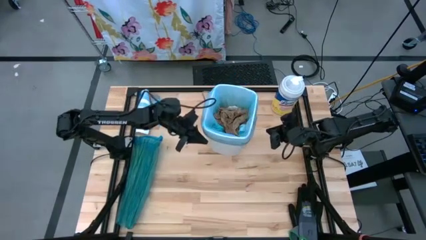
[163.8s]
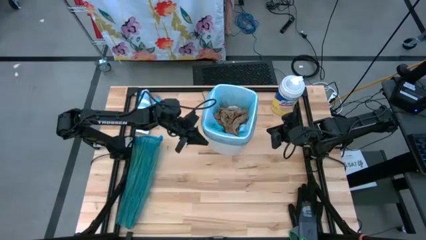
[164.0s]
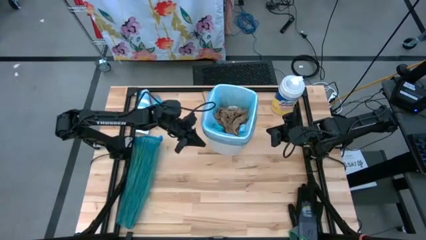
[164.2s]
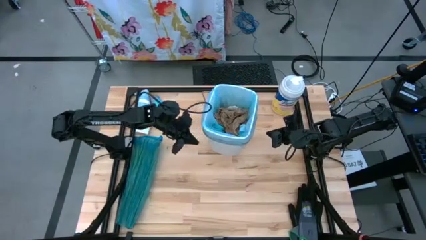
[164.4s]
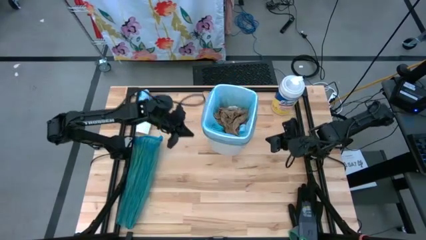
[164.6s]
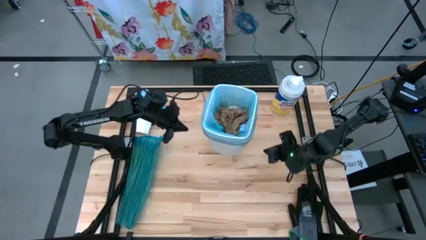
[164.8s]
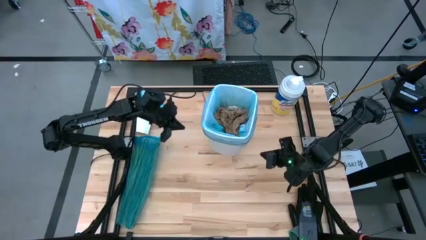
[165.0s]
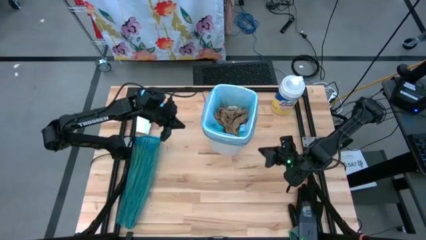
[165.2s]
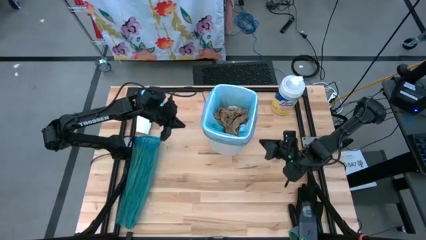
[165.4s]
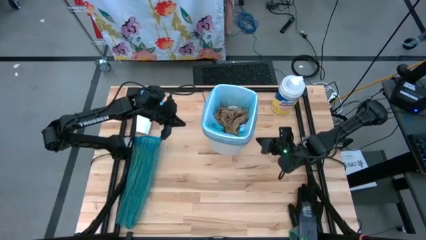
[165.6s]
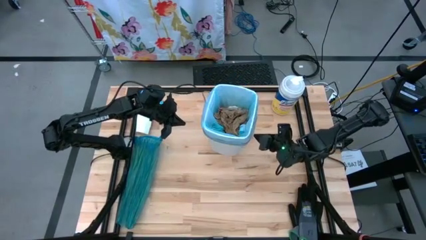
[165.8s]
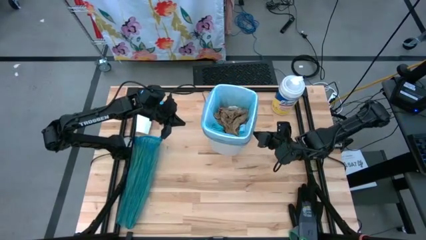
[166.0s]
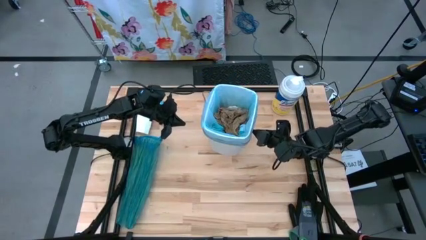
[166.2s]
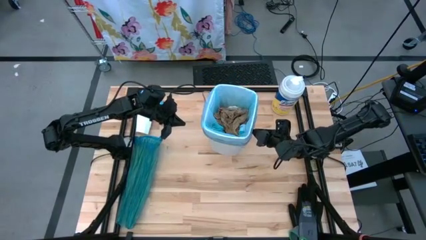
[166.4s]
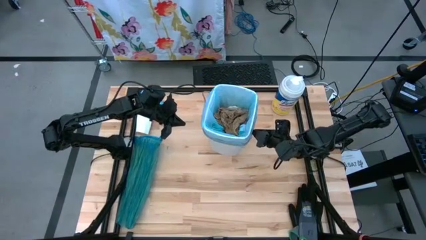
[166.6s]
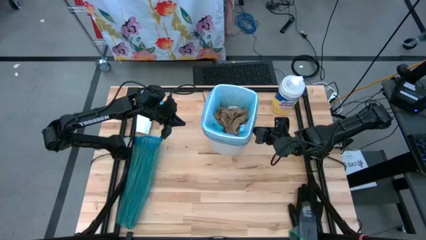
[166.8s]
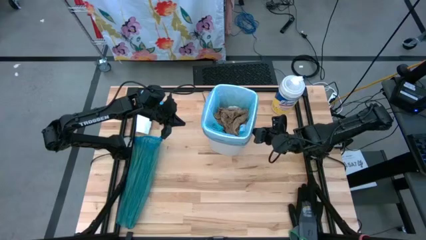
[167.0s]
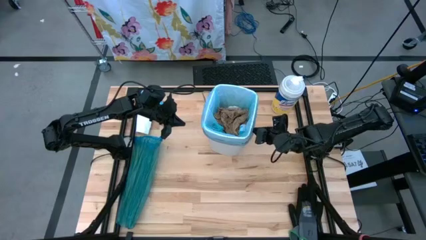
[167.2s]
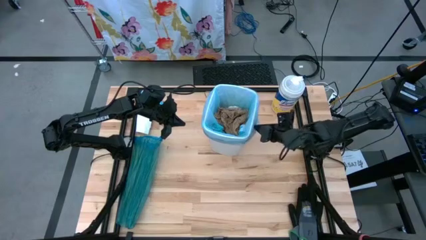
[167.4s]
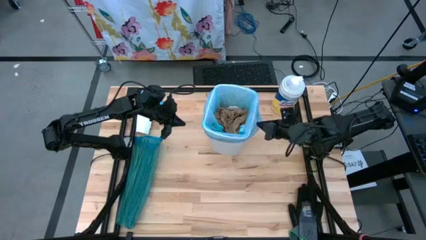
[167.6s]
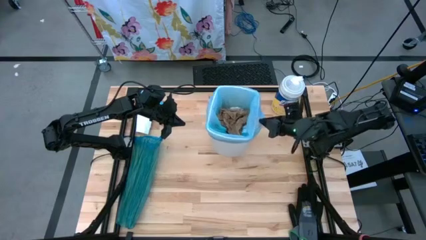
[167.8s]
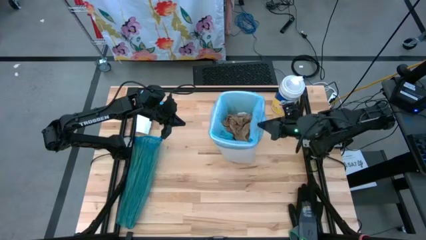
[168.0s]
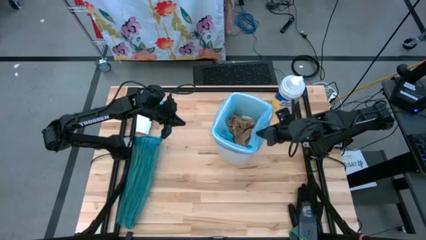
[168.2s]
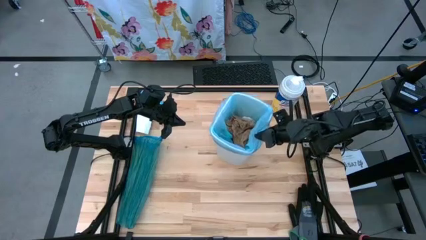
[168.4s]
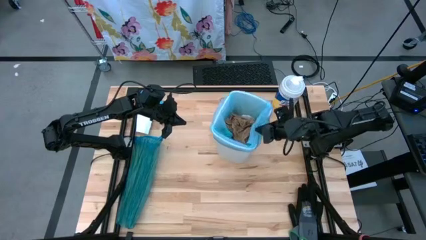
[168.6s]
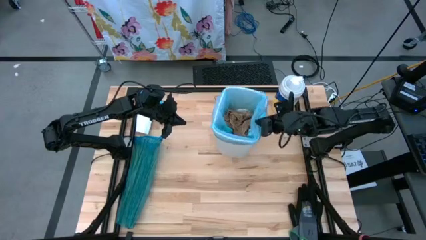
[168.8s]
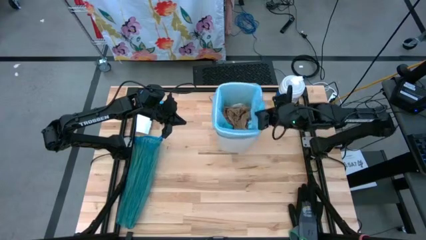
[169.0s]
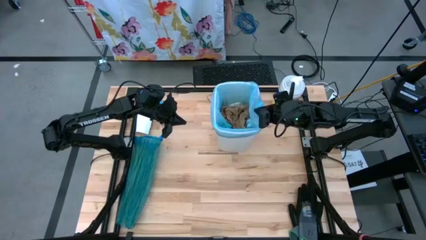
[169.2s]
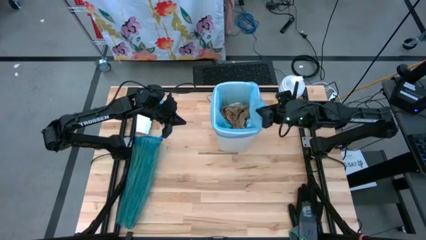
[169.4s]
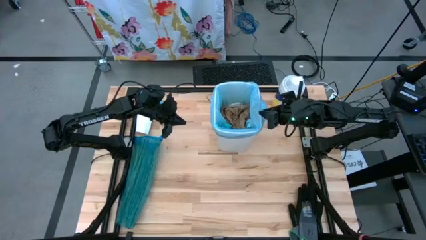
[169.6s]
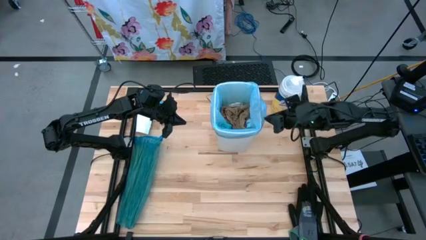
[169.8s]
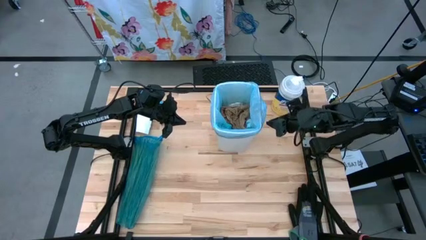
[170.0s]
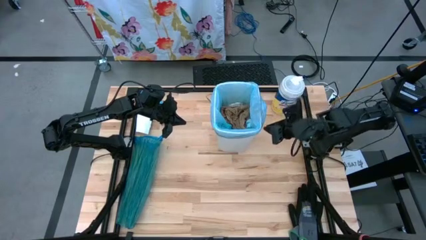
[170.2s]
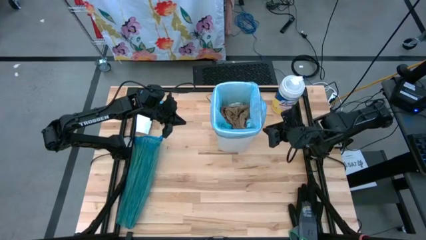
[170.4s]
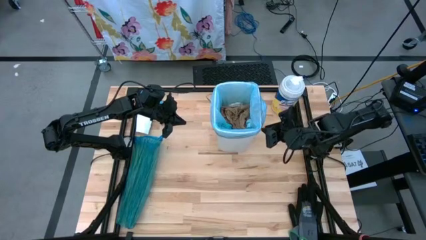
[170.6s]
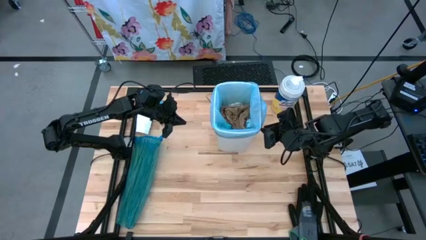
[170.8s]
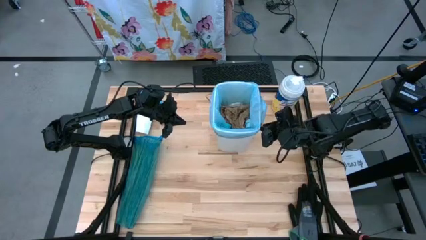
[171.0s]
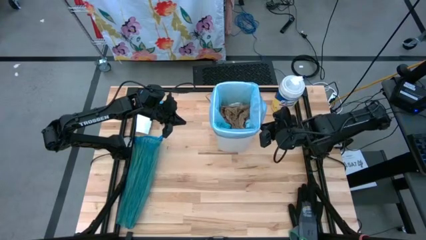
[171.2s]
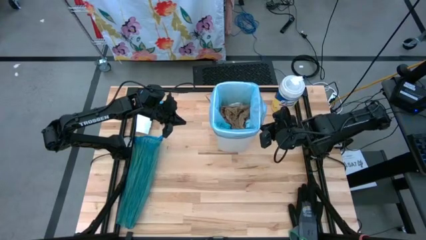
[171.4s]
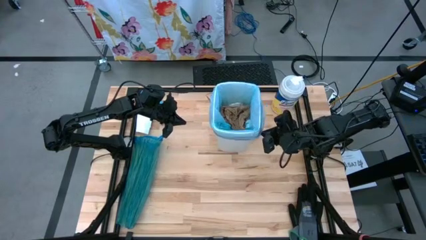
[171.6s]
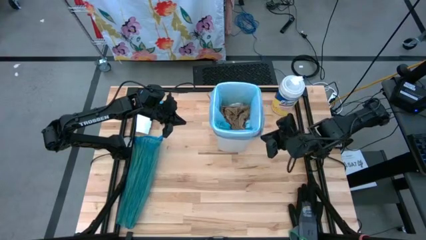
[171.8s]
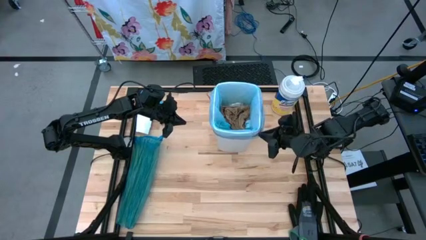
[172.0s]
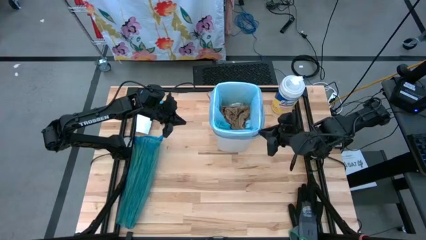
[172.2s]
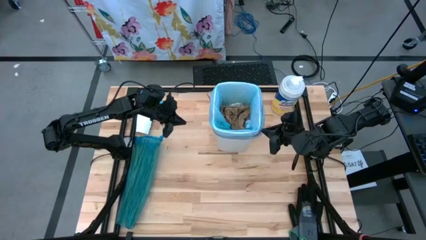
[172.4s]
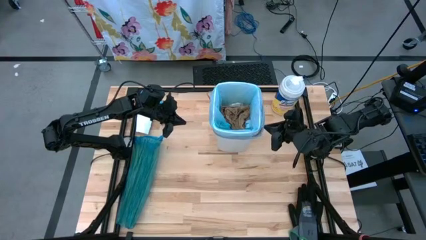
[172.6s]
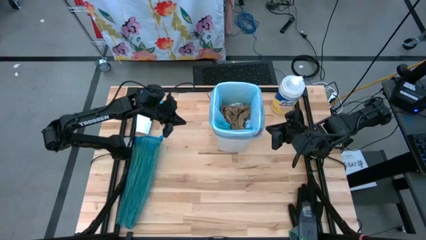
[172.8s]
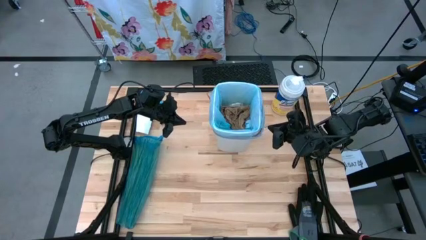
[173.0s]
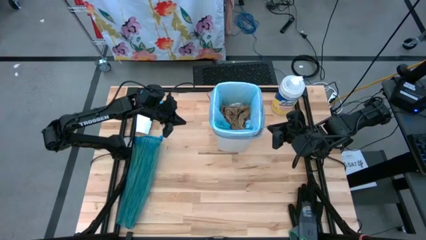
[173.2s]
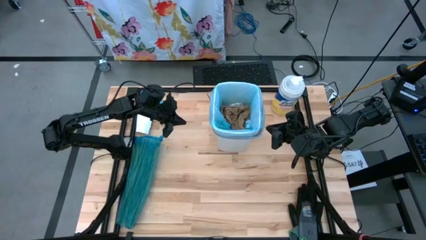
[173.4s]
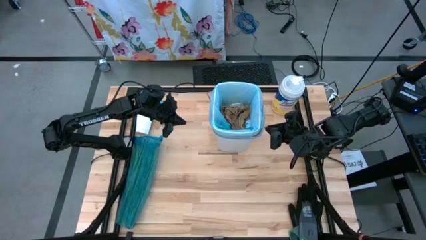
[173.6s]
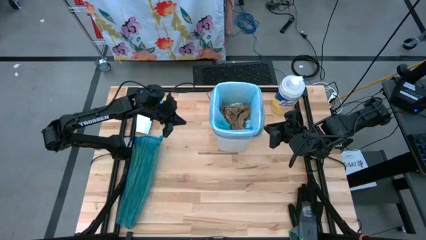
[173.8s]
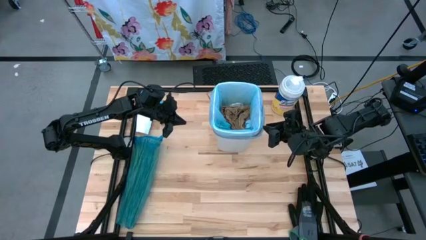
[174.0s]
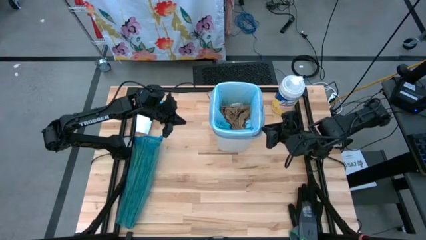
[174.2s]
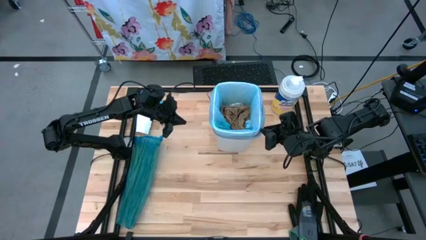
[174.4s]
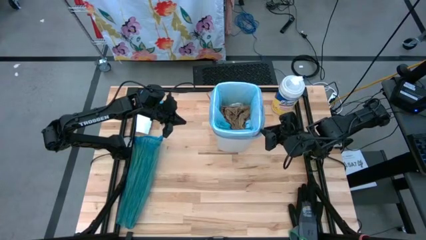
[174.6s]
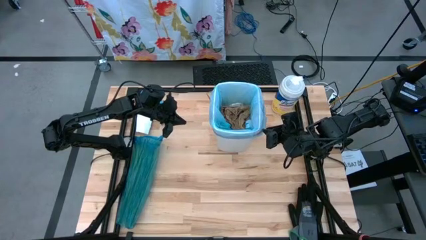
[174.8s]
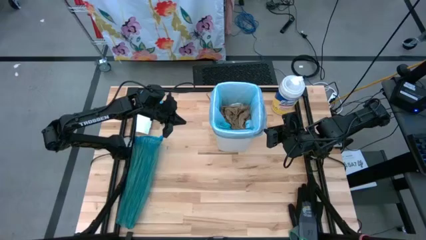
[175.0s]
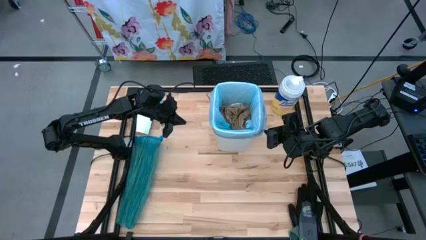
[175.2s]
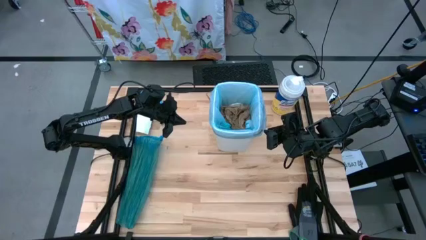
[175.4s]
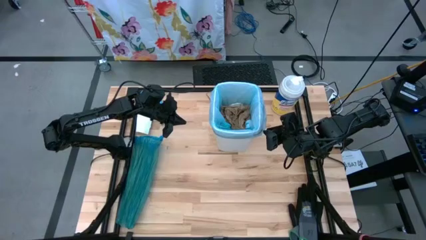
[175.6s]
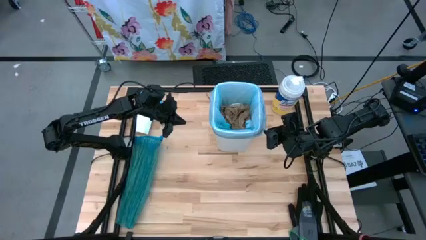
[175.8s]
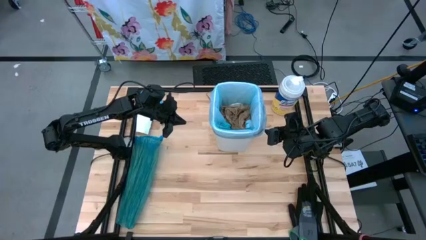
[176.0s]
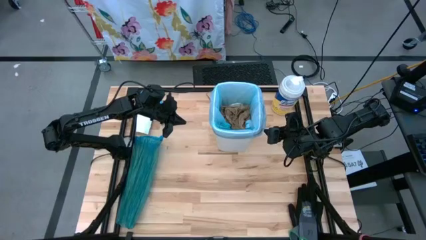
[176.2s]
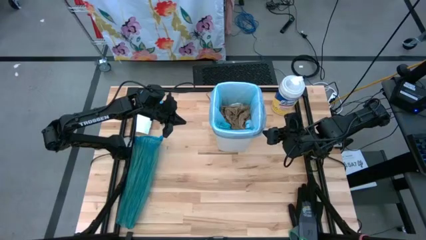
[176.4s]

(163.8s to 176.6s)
Task: place trash/remove bag and relplace
Remove the light blue trash bag from the white trash bin

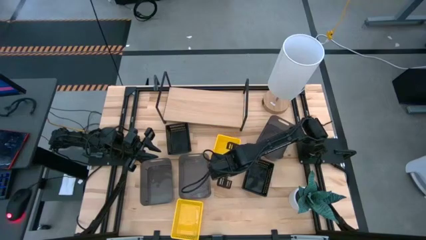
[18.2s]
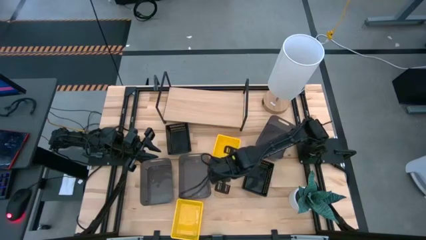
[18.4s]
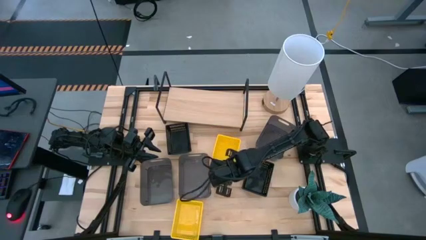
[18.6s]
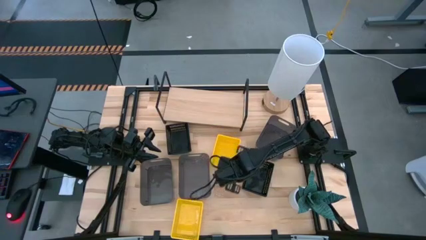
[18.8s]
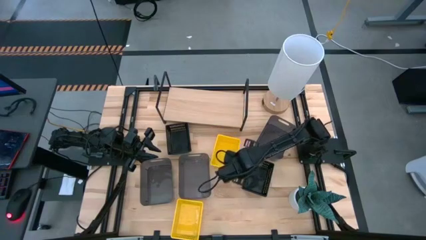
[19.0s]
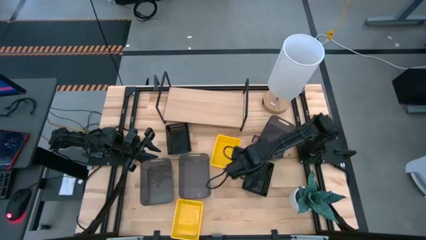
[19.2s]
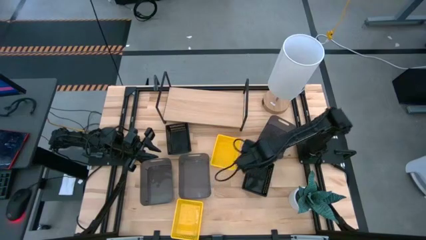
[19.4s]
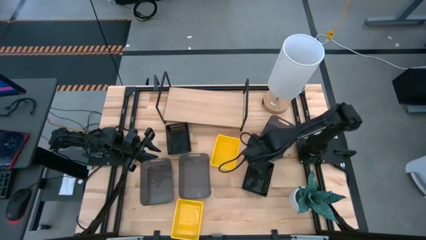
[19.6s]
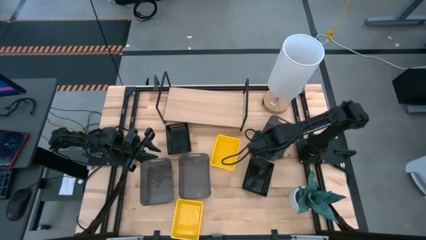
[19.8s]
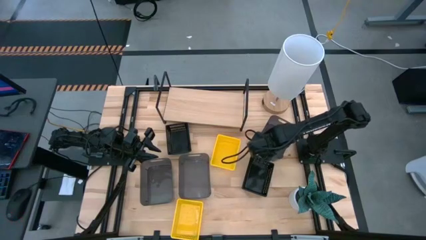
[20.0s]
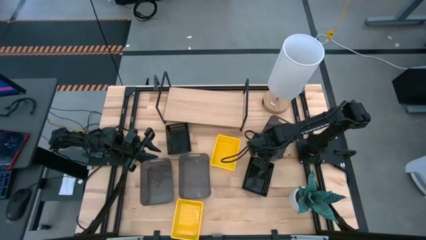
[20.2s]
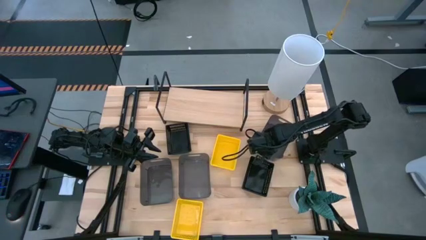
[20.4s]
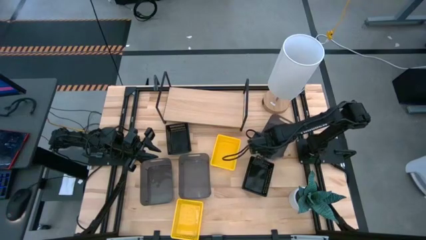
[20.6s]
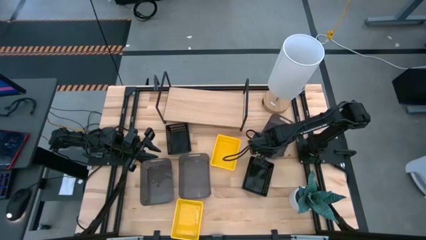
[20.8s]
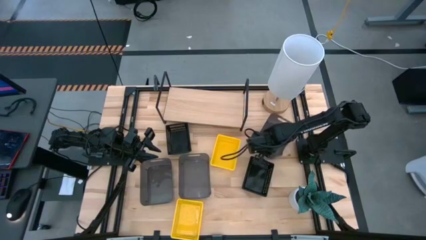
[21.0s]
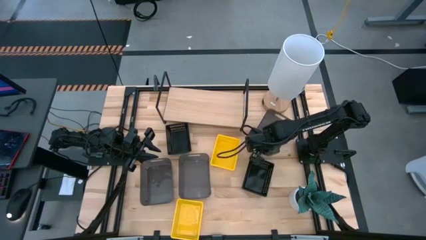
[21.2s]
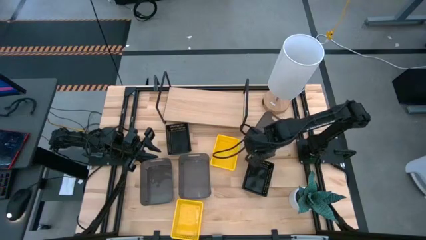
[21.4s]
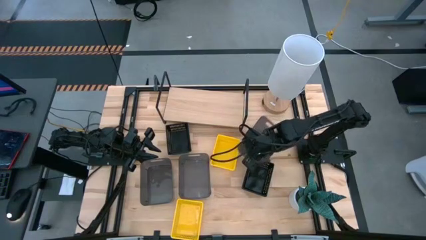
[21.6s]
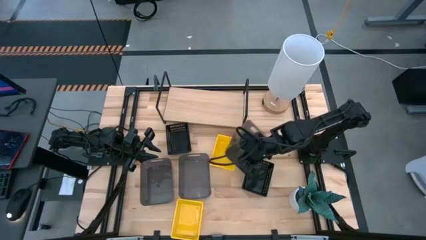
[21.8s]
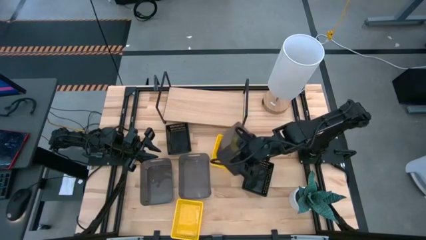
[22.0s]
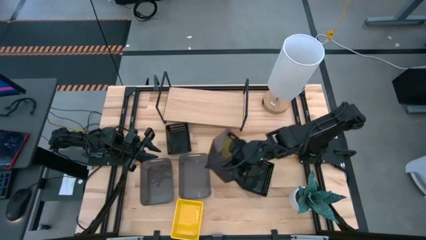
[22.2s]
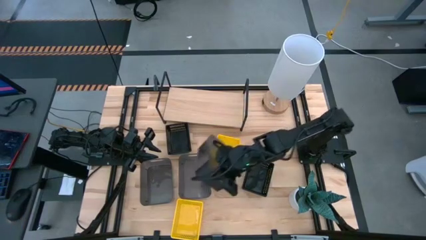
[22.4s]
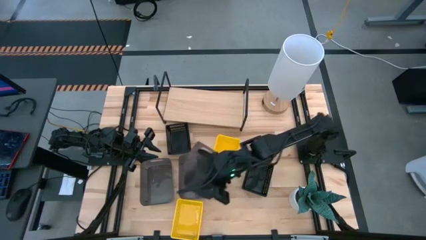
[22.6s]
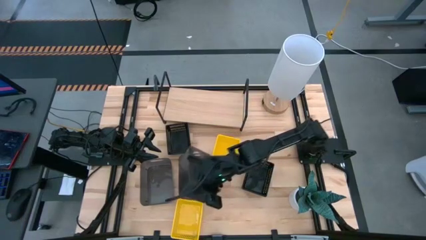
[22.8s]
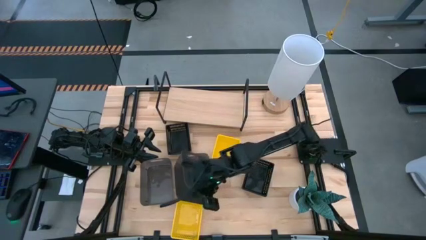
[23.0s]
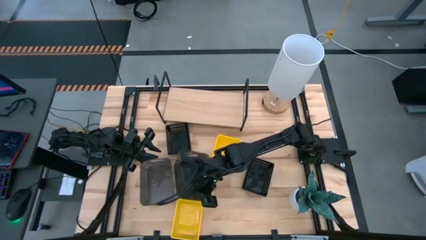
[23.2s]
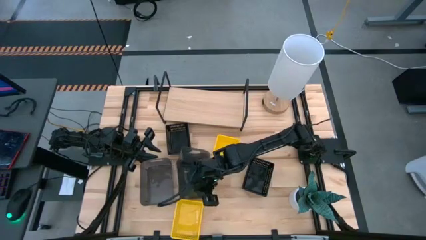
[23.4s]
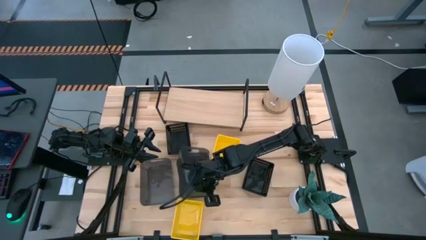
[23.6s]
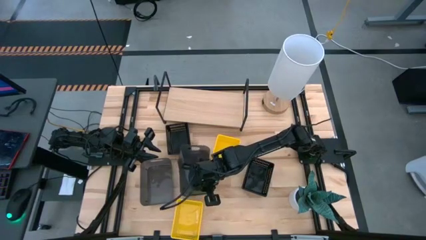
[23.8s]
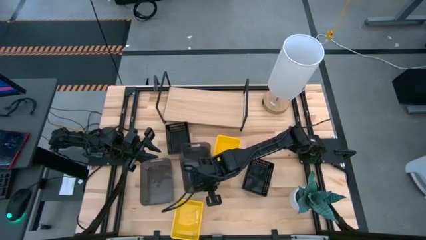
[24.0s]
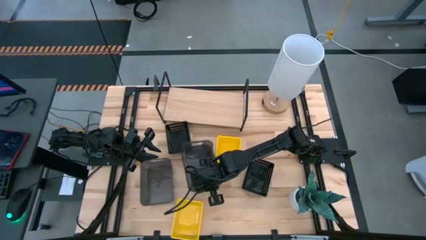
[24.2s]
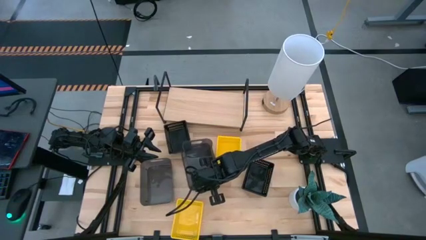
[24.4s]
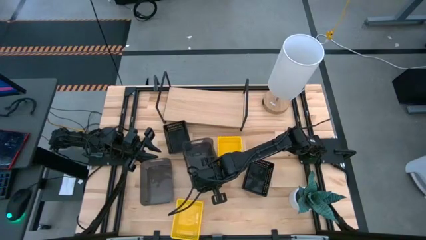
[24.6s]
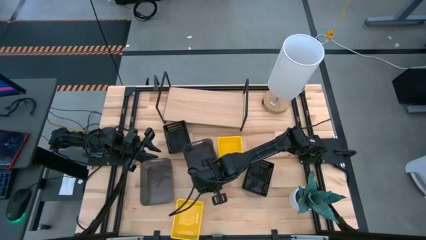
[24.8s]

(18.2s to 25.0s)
Task: Stack baskets on shelf by color
Stack the top gray bin on top of the bottom right gray bin
